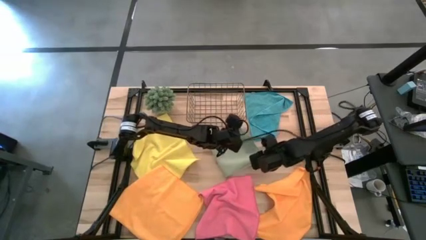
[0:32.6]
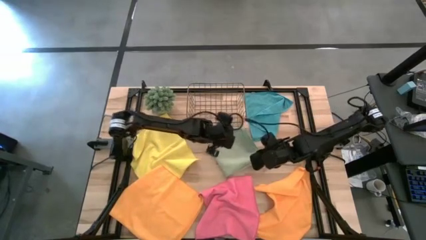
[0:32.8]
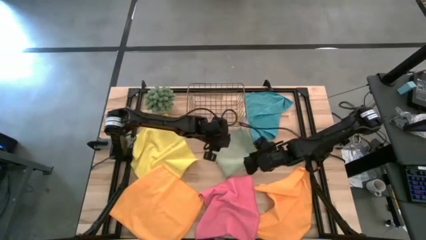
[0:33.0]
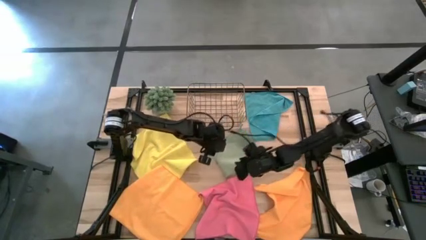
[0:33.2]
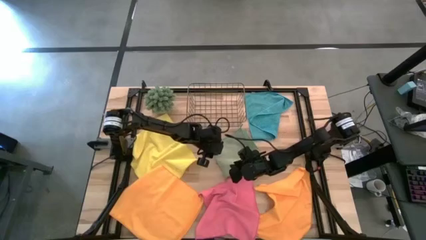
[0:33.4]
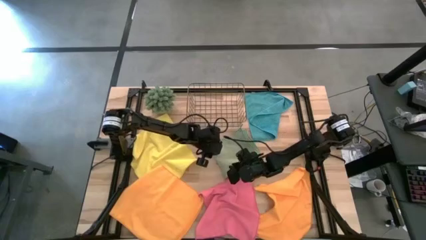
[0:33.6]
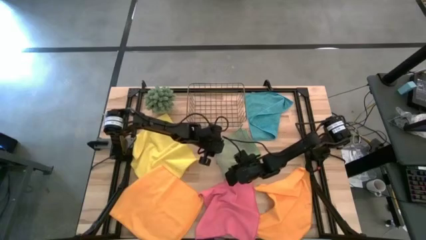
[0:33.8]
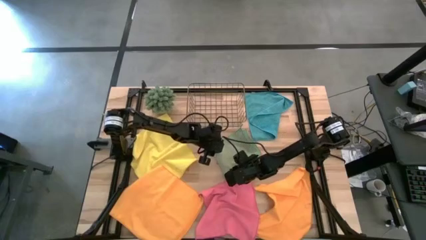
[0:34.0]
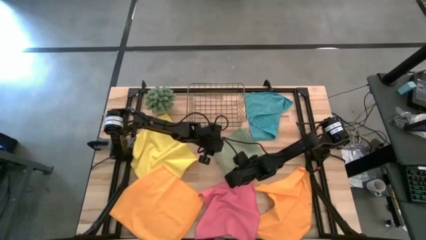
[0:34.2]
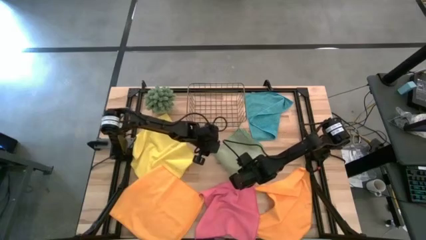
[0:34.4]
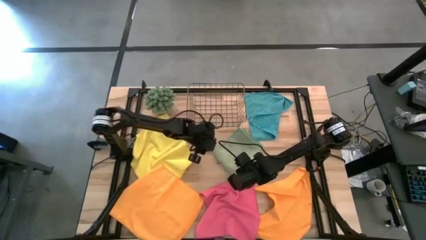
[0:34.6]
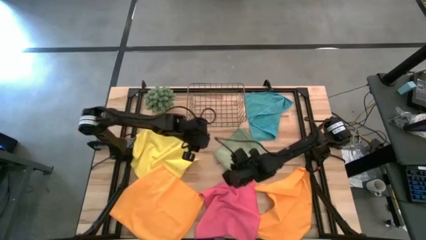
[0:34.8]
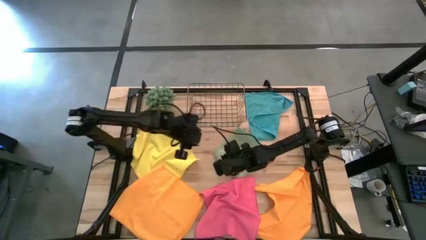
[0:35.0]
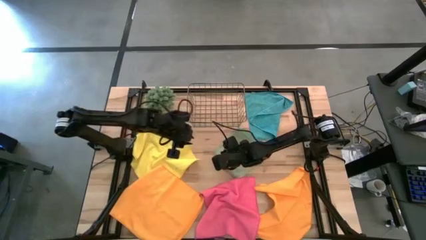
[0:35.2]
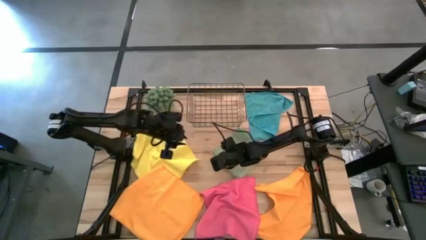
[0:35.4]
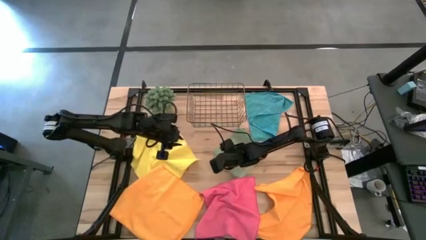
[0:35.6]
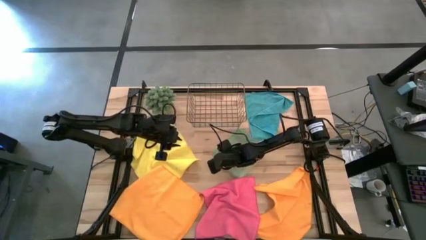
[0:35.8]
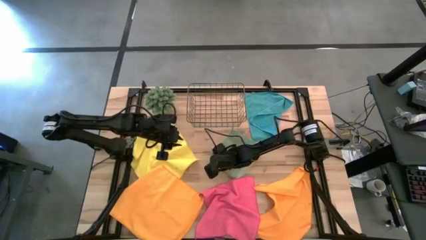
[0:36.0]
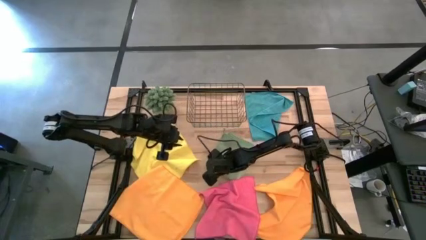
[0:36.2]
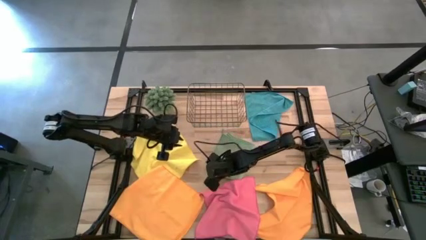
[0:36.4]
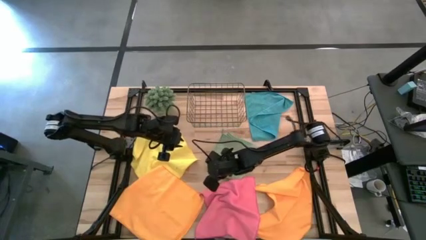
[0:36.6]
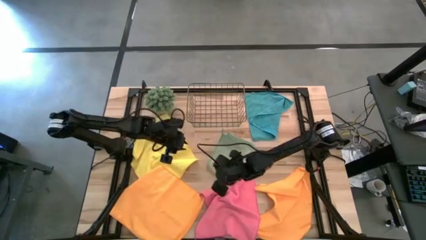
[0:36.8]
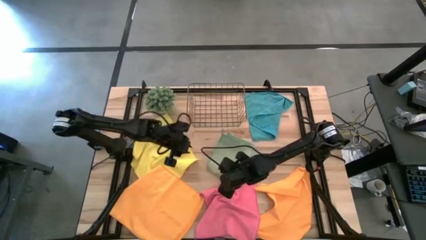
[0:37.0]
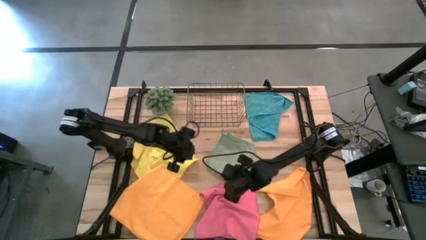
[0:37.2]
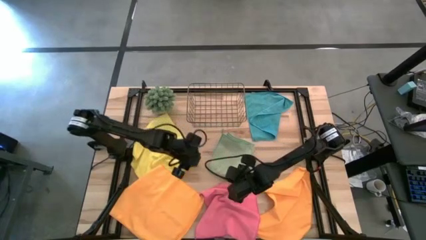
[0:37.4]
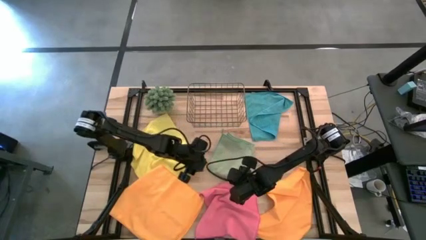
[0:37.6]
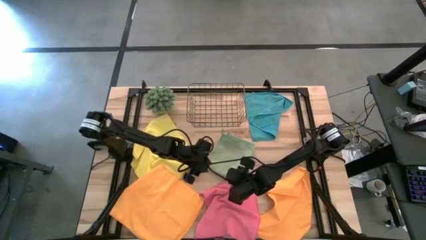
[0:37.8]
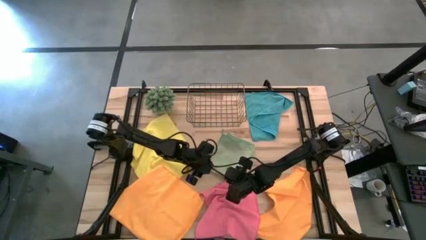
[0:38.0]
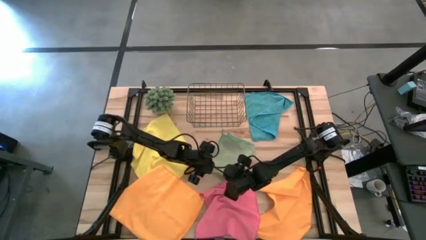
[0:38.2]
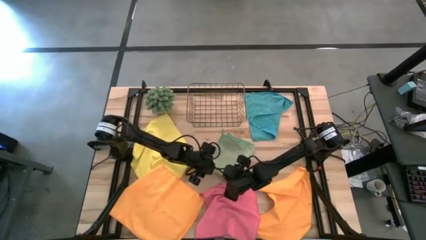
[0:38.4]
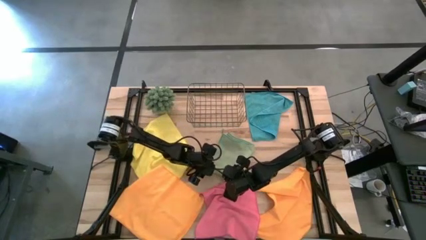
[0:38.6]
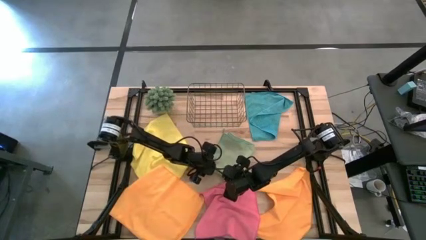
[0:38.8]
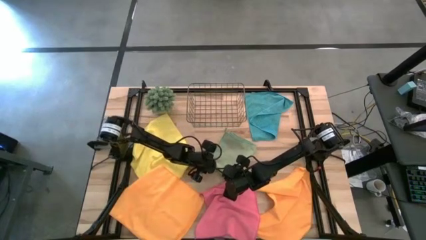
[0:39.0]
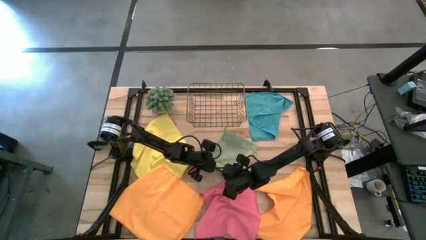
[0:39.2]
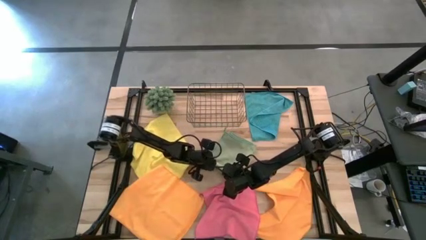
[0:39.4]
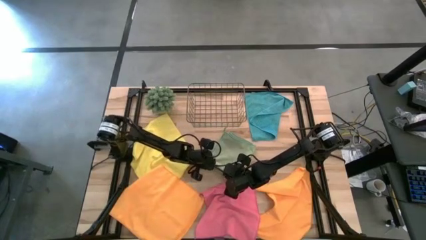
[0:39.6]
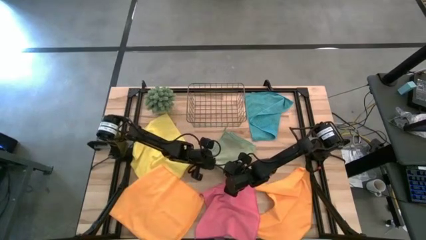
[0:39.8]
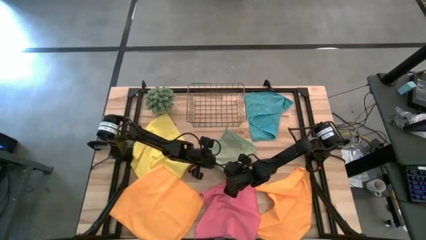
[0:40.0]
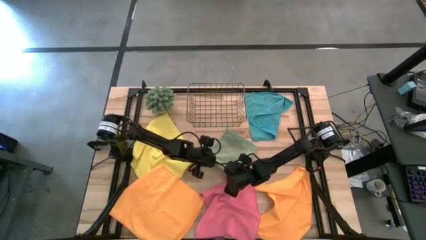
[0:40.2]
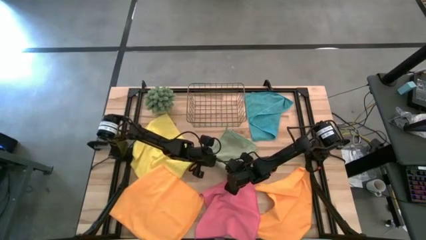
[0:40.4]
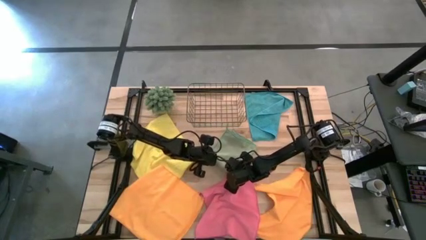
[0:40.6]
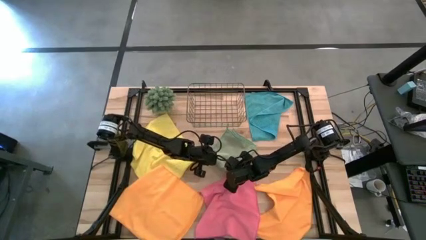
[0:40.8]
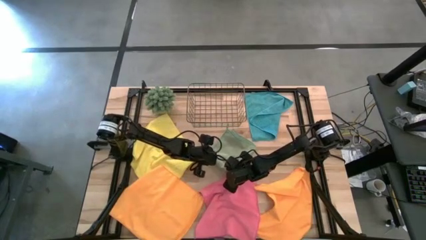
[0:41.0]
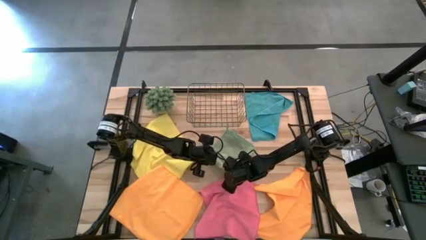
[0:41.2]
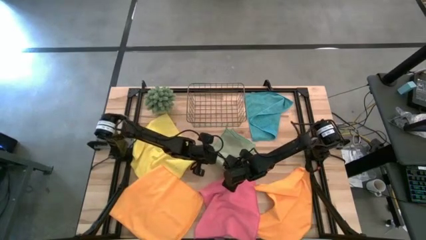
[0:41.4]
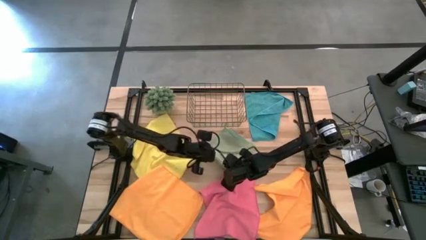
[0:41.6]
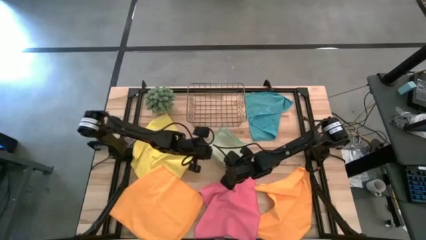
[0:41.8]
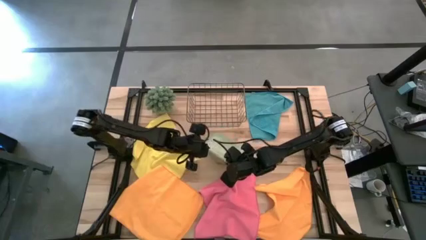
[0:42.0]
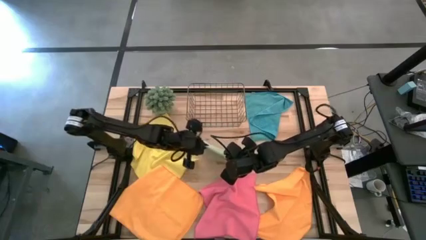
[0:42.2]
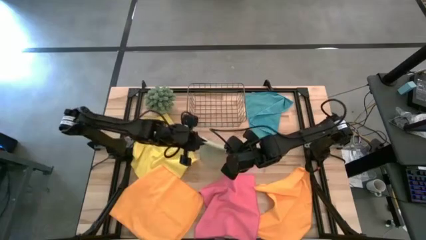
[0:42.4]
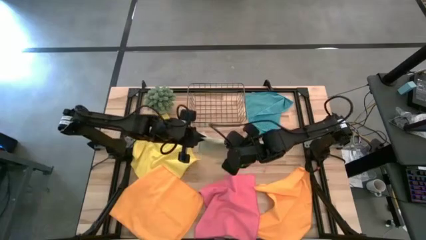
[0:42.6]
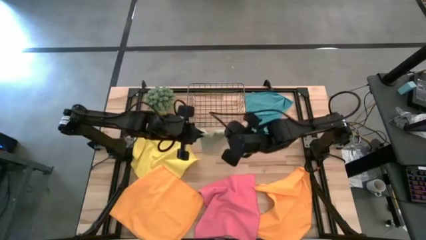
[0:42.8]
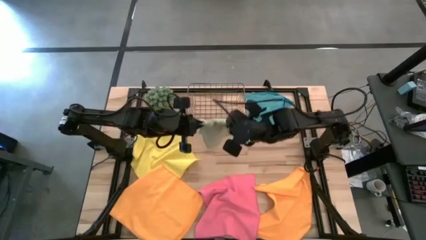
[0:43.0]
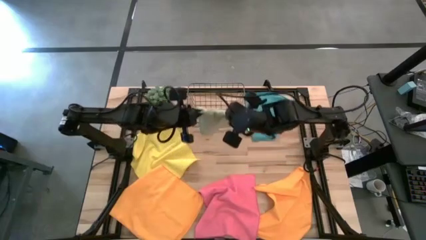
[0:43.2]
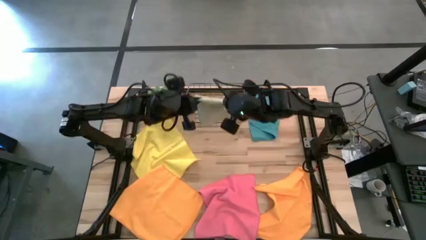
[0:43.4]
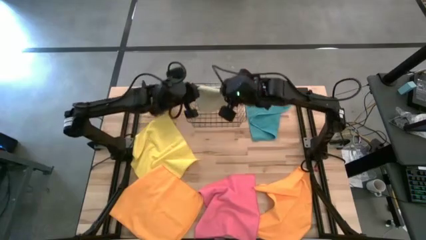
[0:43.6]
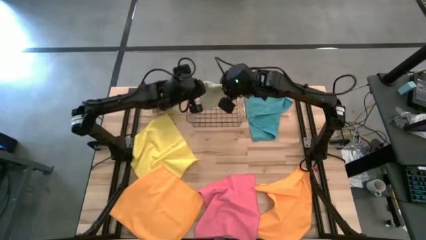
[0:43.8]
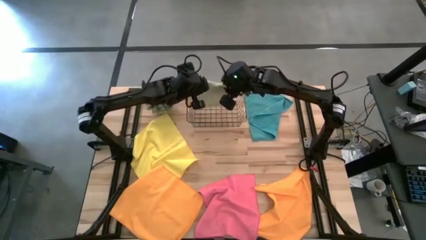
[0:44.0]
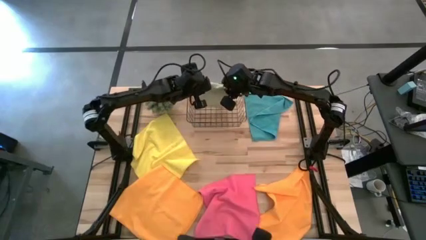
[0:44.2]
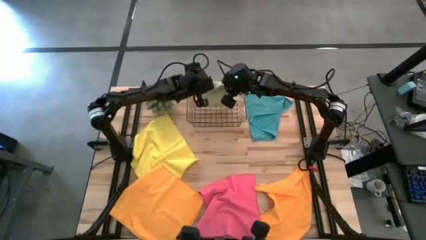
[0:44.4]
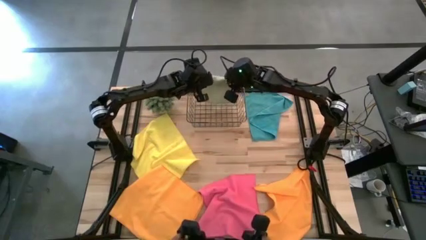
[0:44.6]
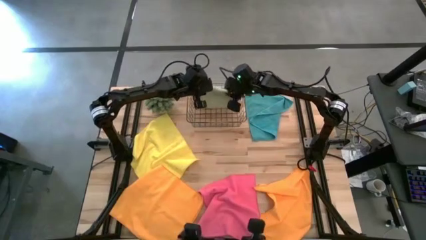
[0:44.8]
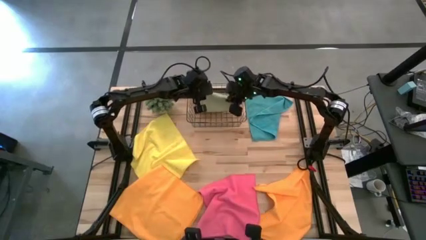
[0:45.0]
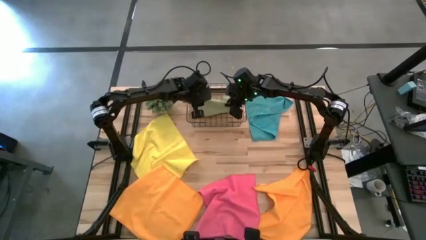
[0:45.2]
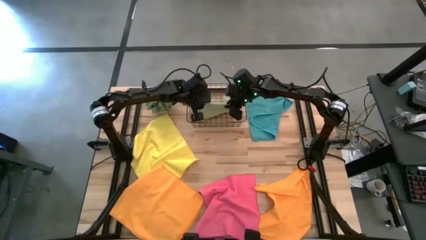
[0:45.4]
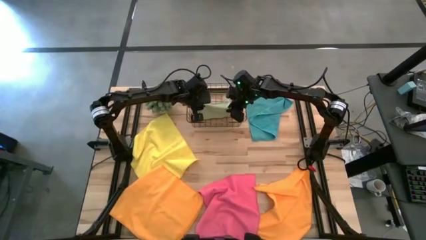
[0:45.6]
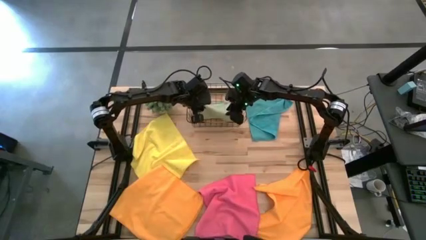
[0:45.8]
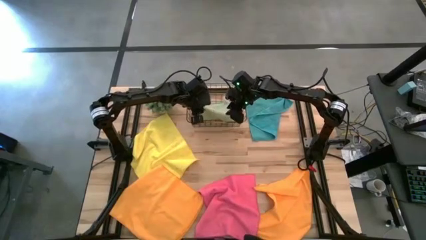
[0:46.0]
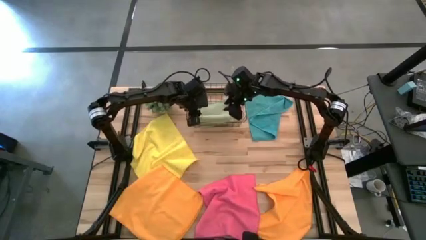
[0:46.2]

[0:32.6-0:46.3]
Task: Fold microfiber towels
Put the green folded towel into the wire basket
